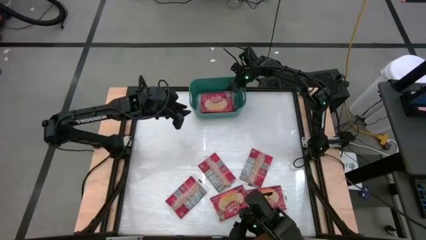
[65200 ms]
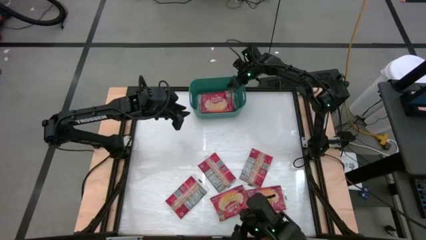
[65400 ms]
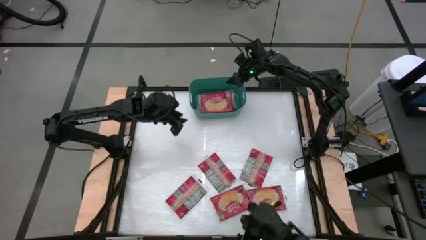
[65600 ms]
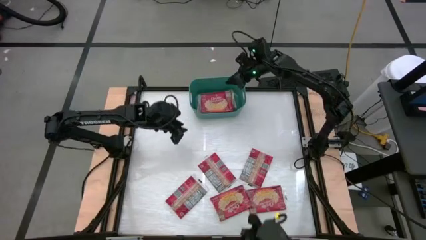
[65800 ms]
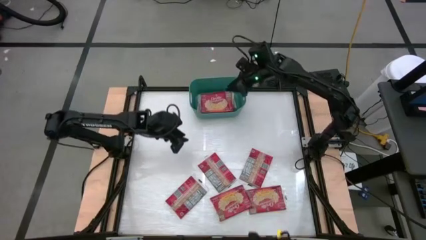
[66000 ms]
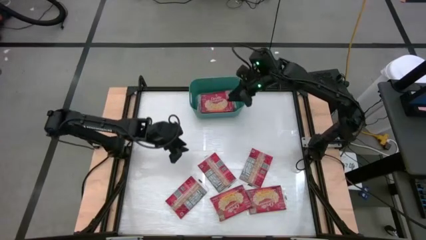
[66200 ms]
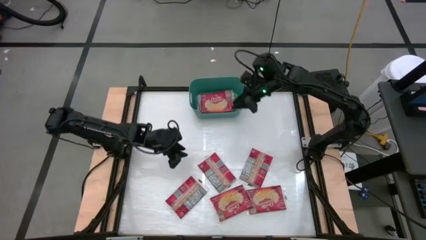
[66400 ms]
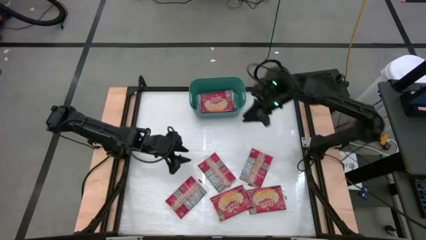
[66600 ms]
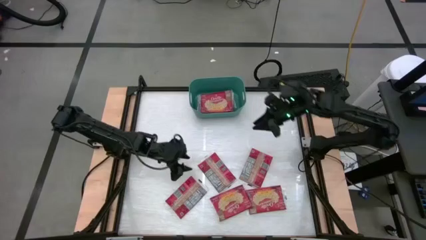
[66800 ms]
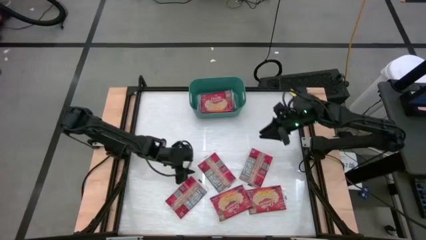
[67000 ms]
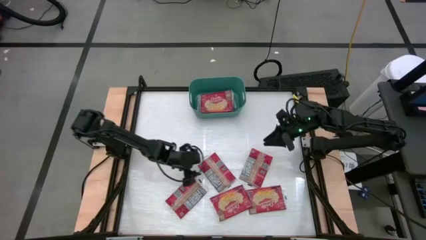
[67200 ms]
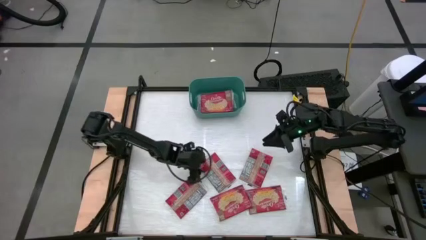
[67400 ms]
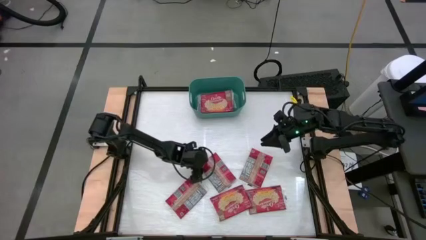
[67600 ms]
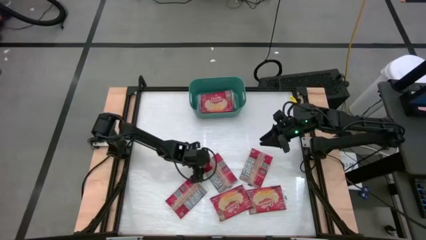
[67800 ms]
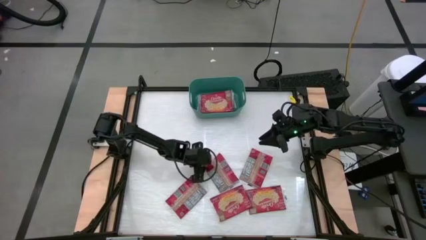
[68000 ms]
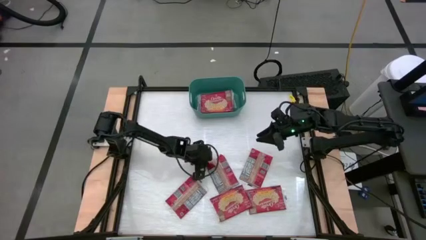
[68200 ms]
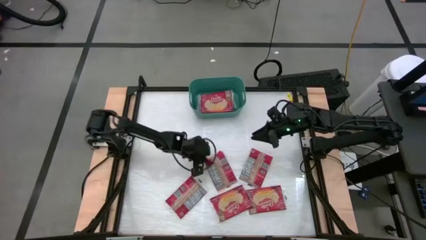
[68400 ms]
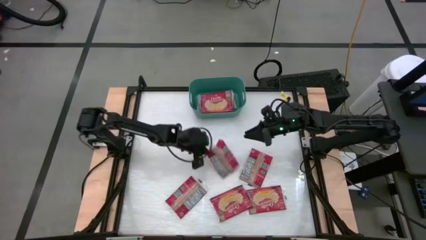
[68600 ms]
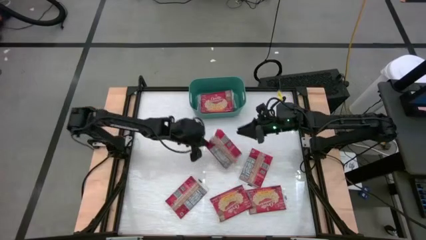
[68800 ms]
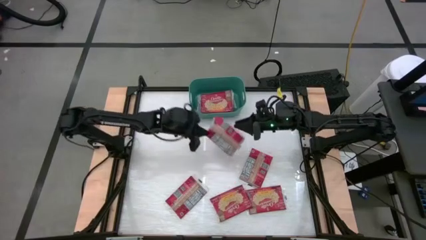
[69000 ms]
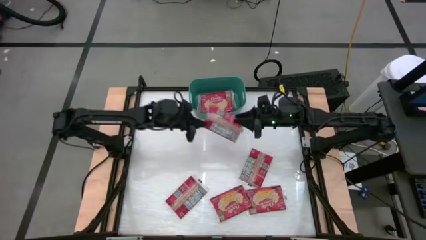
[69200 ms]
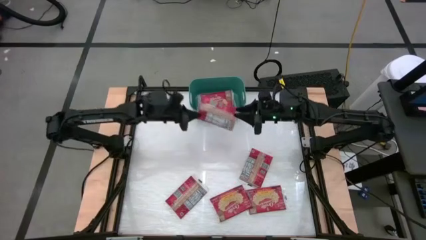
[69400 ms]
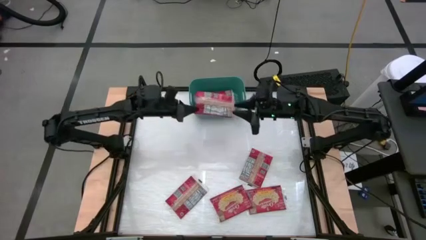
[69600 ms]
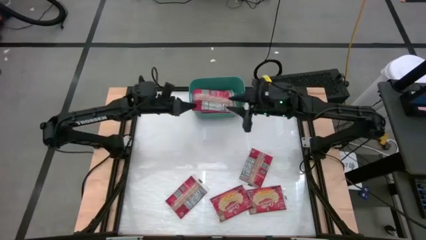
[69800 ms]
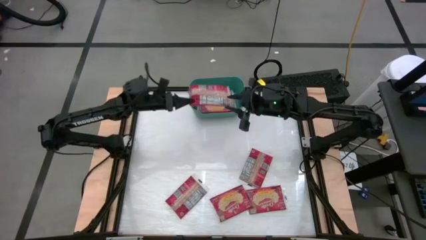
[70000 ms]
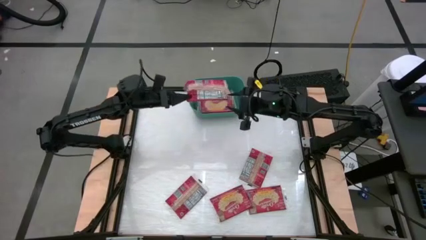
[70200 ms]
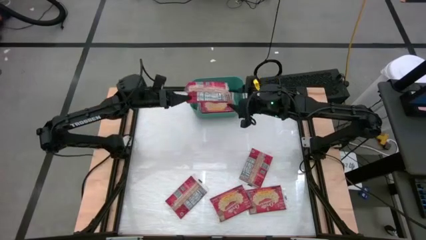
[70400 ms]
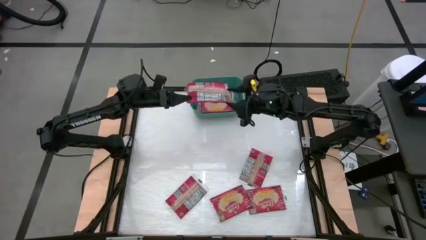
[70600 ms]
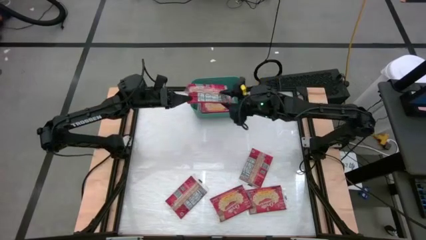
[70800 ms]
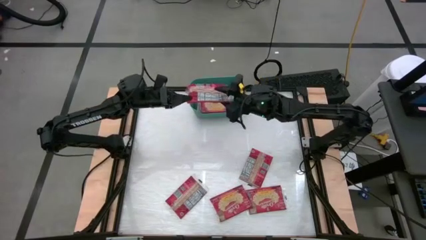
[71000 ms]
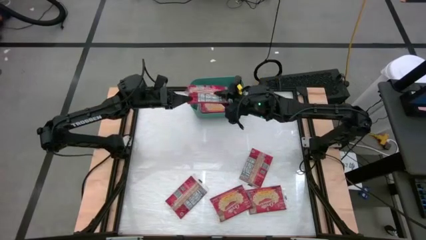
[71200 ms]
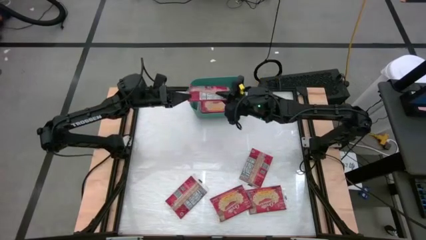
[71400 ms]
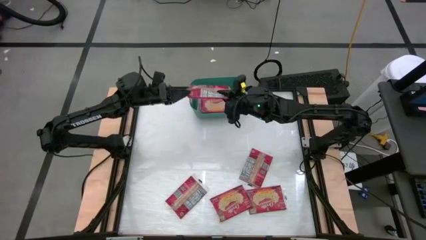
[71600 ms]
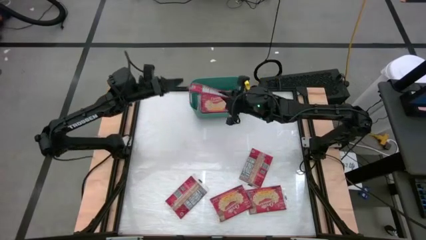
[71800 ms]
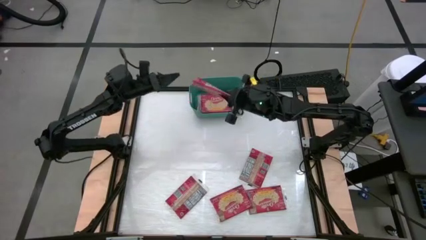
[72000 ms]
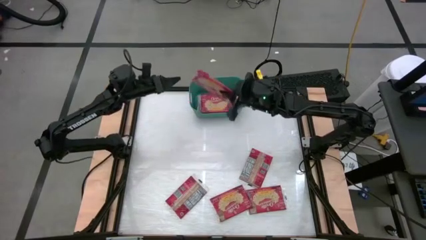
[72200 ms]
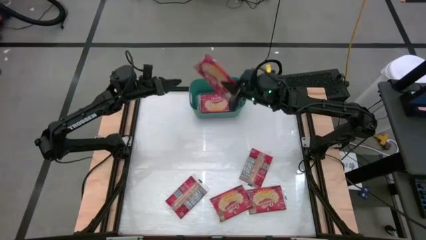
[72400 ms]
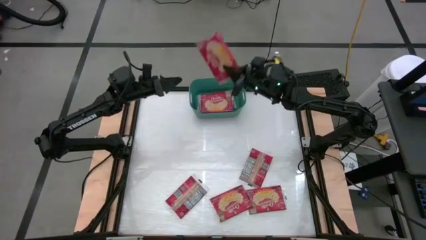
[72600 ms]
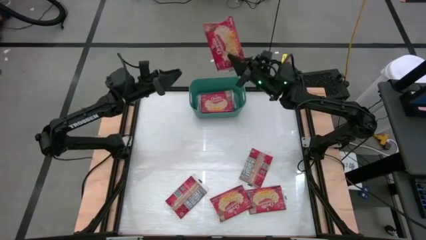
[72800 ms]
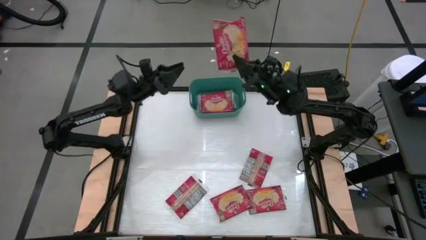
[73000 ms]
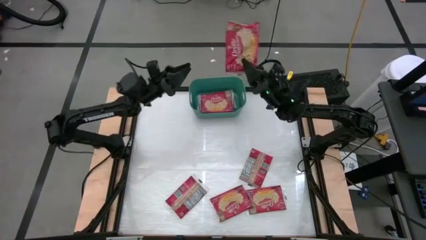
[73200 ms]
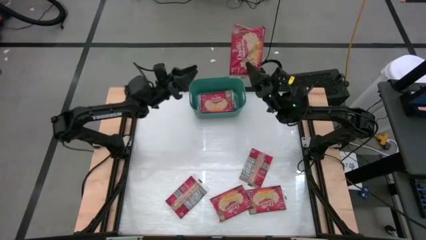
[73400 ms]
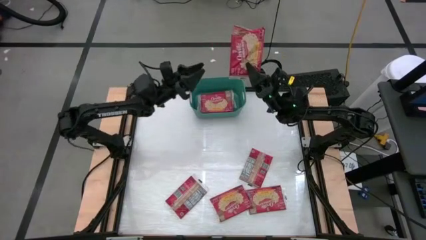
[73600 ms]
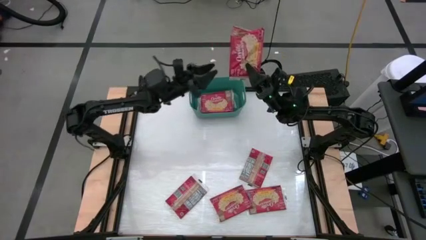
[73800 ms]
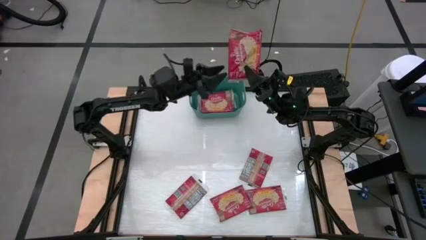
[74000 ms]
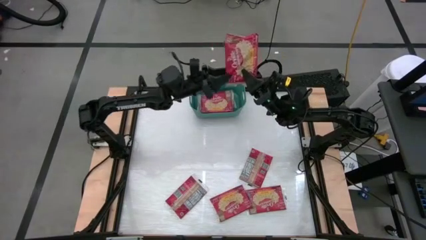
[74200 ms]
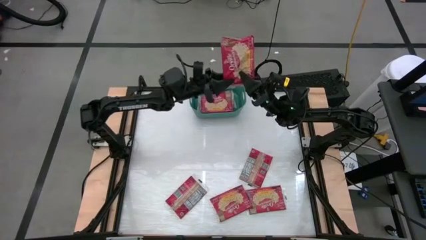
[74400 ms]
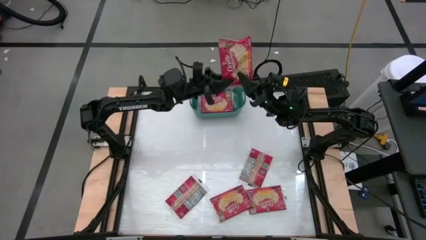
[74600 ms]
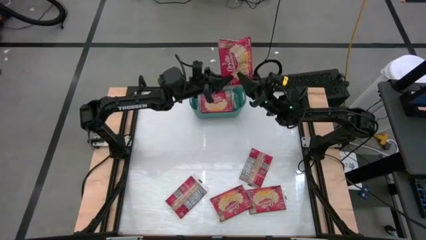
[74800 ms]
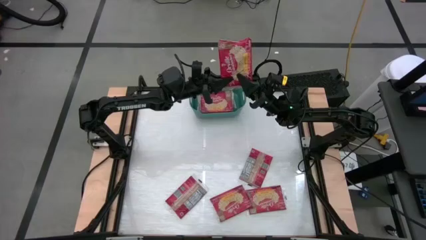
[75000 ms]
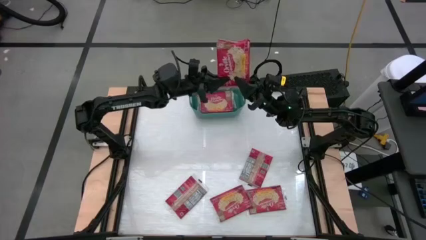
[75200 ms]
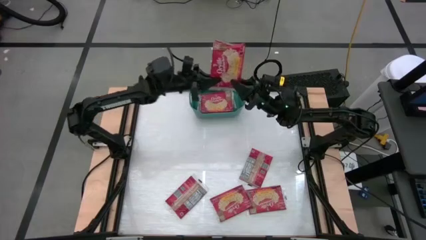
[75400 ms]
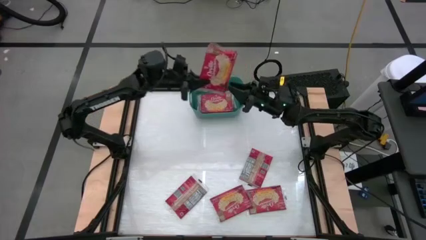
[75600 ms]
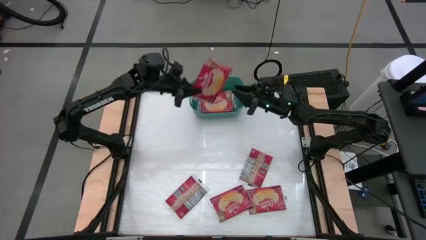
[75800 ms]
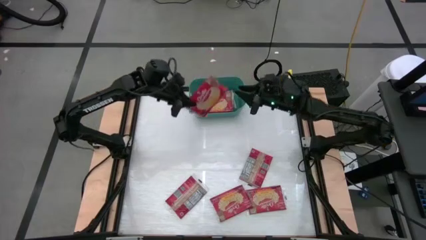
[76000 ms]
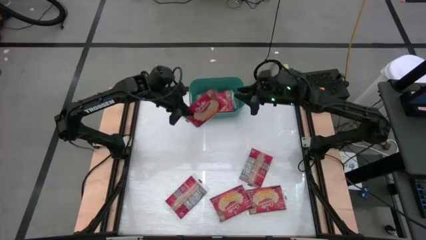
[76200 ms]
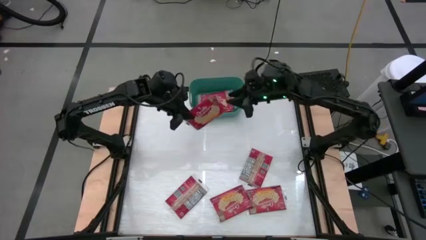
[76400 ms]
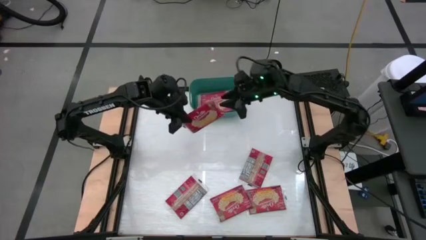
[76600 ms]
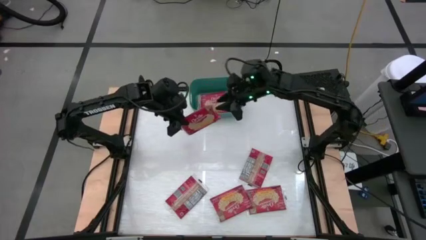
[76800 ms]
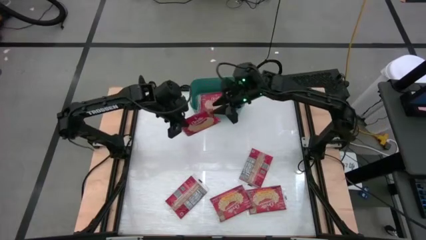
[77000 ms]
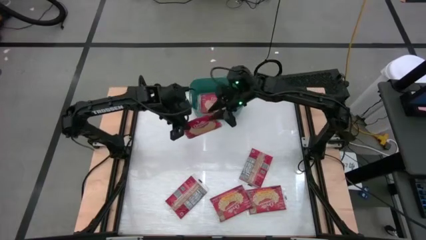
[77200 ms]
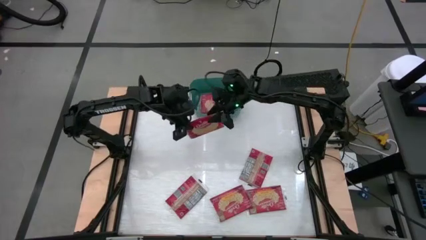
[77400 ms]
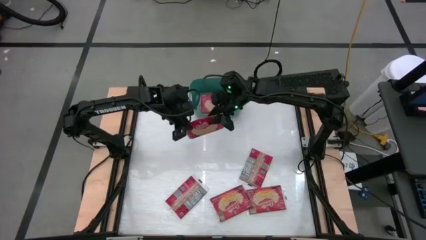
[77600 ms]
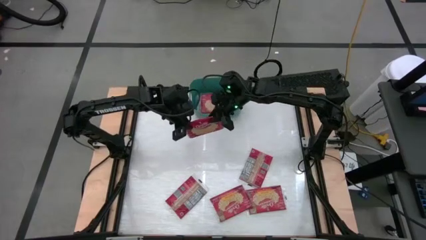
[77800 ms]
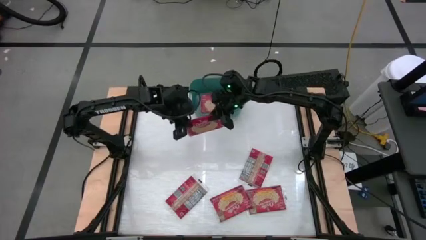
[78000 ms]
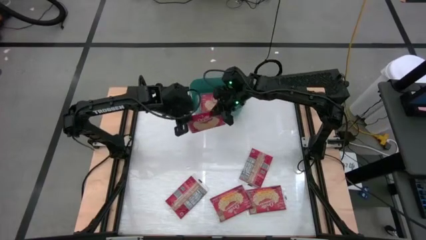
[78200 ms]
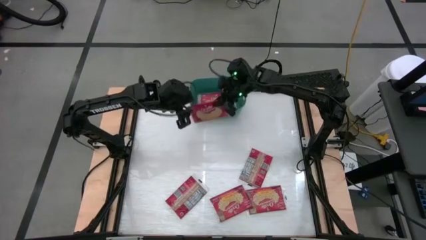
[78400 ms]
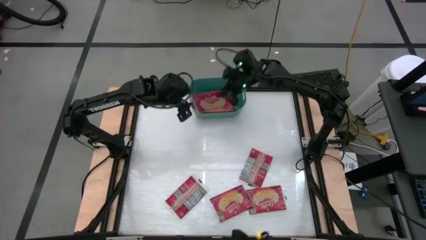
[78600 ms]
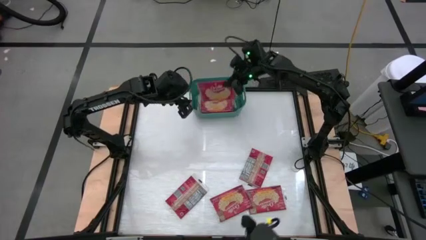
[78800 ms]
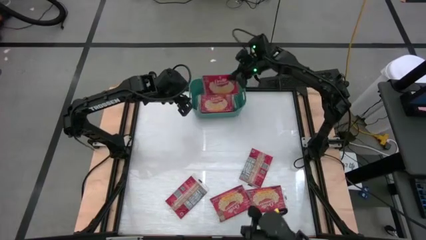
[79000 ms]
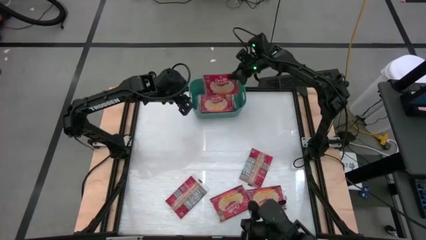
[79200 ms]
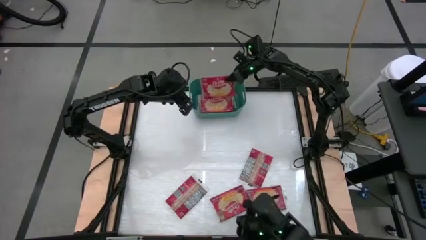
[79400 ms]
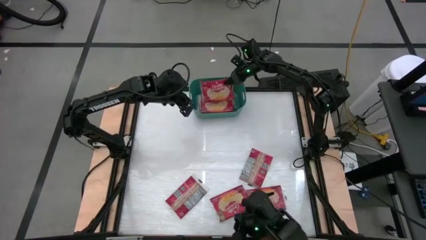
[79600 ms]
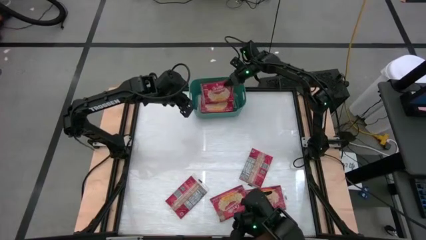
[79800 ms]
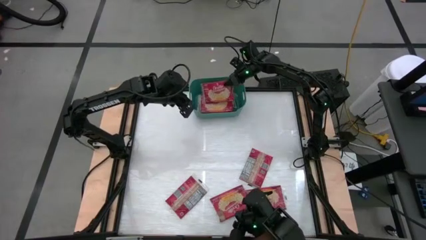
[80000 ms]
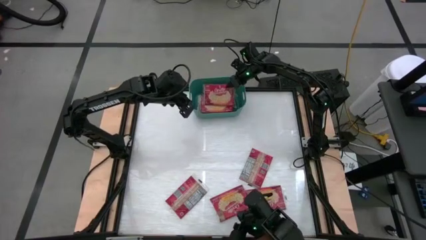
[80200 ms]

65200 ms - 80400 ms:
Task: Sort popcorn bags into baskets
Put the red popcorn pack into the green bin

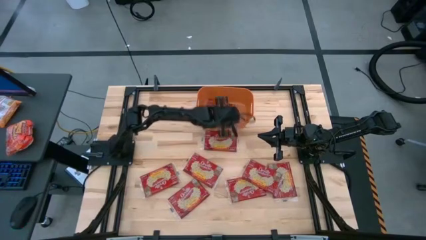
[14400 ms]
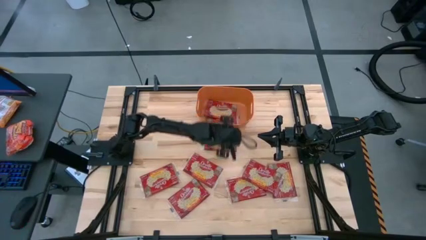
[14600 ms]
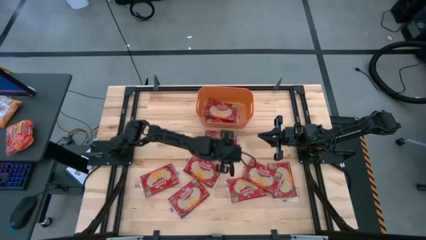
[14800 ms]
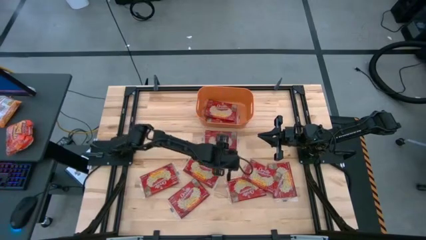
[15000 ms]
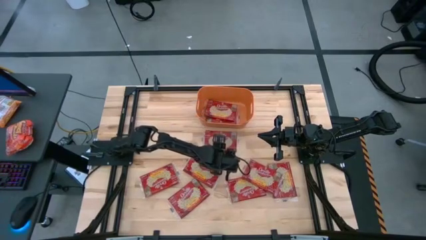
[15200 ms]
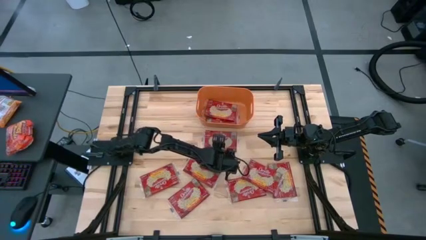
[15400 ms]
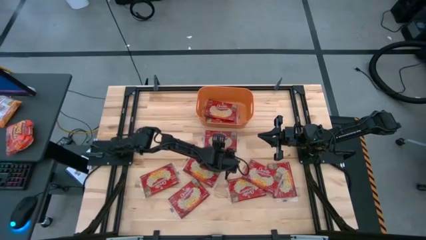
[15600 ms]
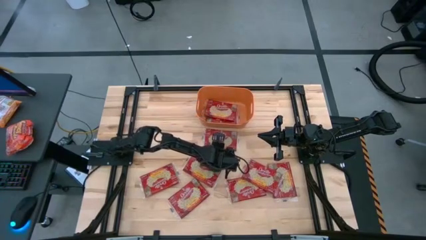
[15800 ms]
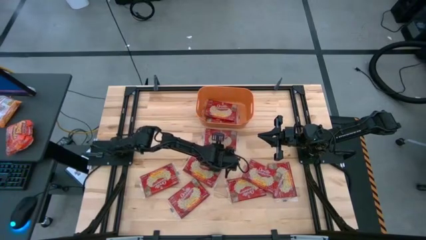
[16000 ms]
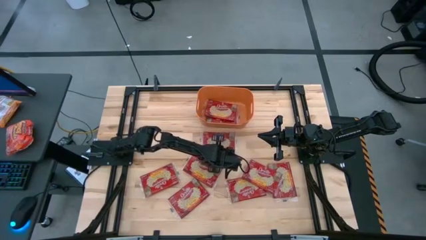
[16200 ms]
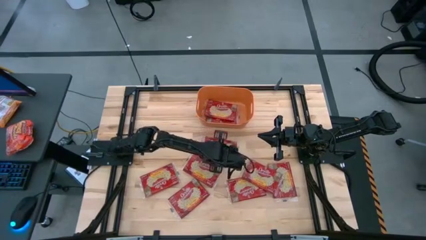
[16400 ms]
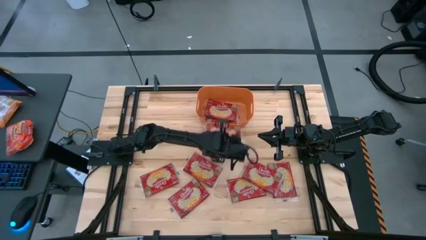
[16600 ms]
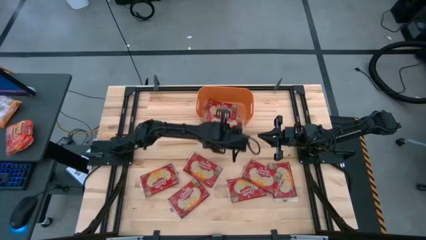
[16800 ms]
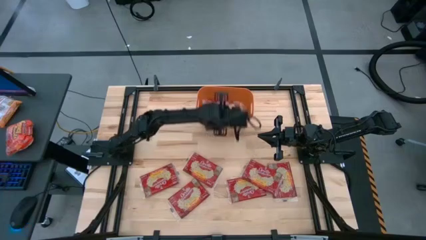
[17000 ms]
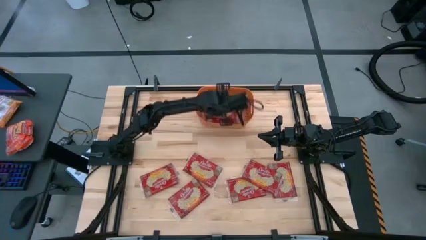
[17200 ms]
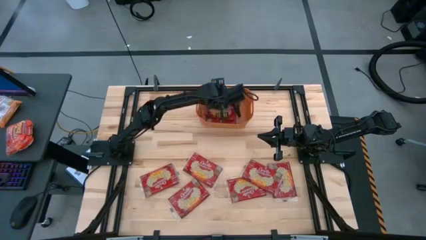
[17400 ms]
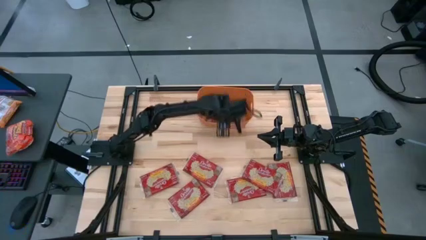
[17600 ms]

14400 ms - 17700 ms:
Task: Sort popcorn bags into baskets
Put the red popcorn bag into the orange bin
